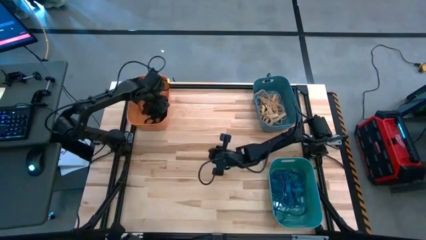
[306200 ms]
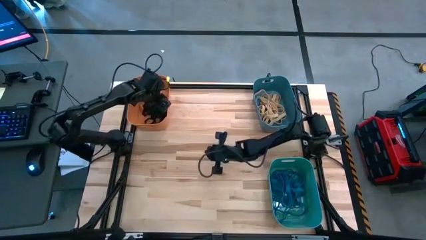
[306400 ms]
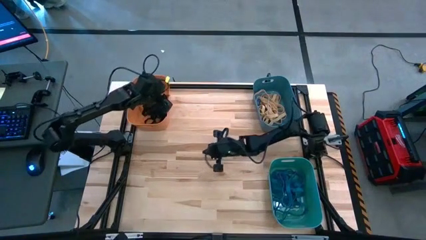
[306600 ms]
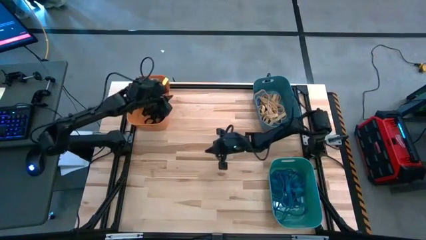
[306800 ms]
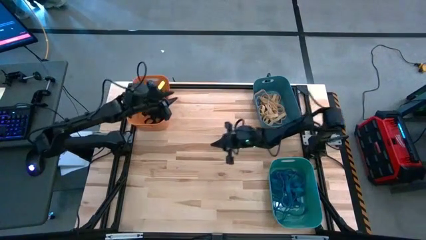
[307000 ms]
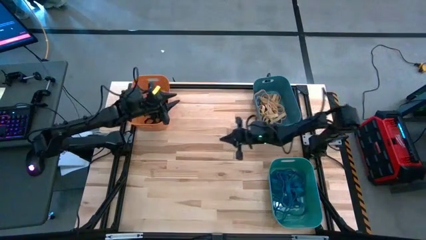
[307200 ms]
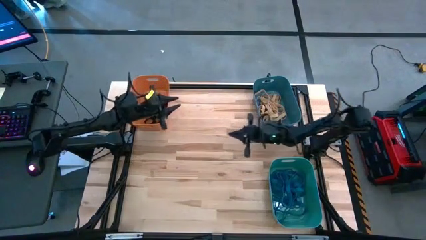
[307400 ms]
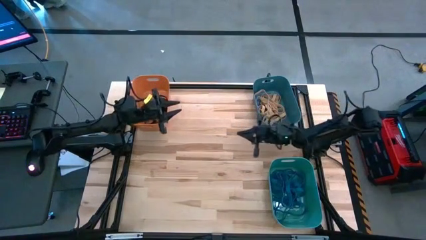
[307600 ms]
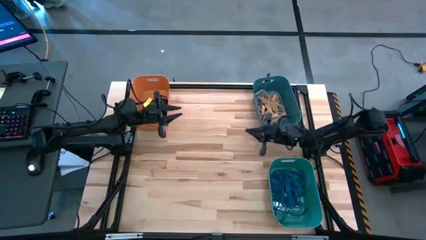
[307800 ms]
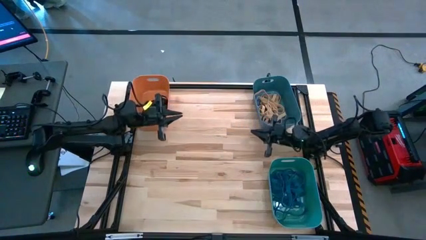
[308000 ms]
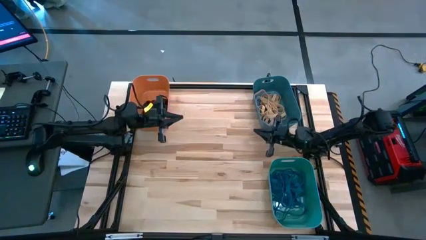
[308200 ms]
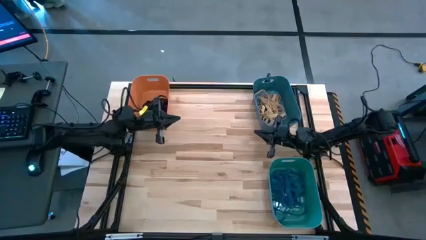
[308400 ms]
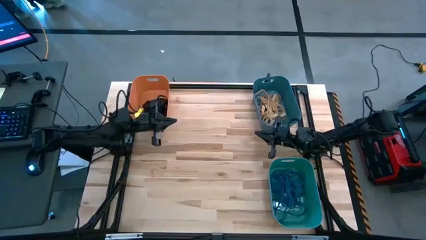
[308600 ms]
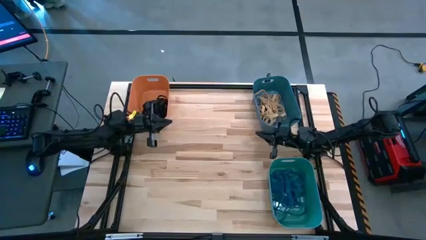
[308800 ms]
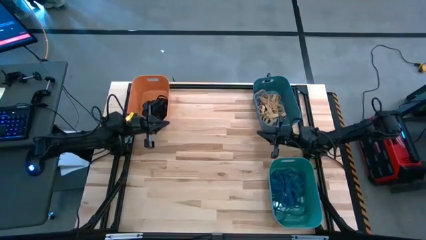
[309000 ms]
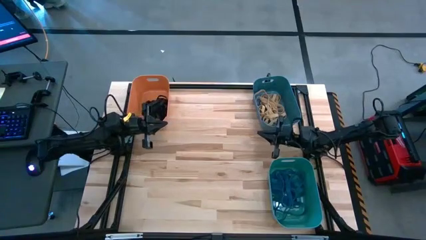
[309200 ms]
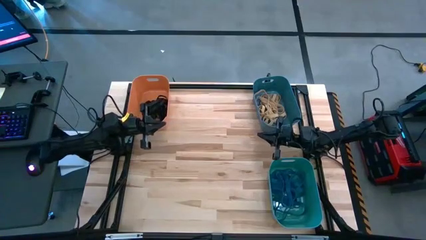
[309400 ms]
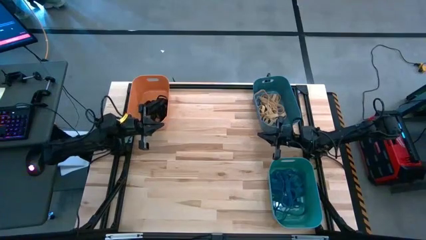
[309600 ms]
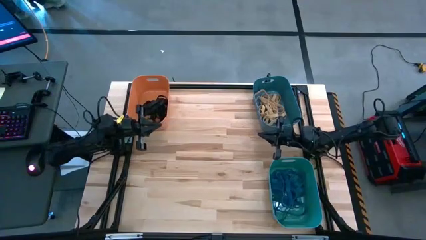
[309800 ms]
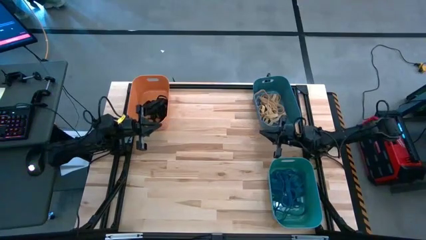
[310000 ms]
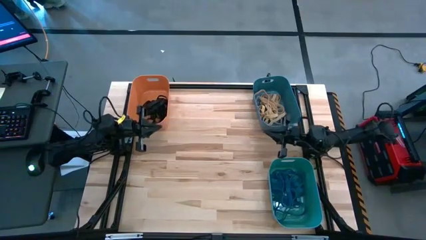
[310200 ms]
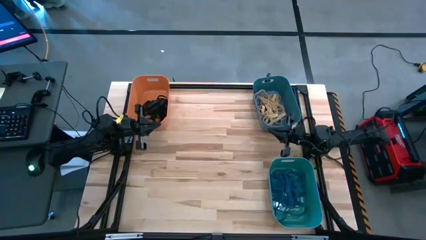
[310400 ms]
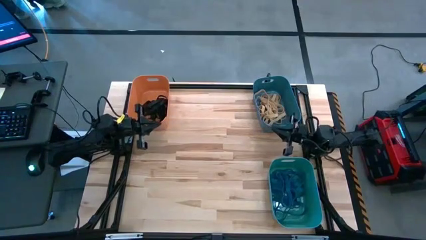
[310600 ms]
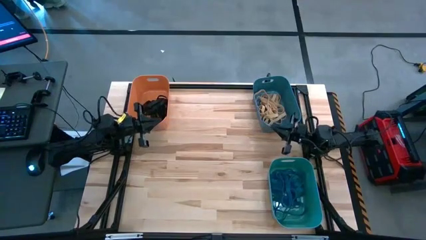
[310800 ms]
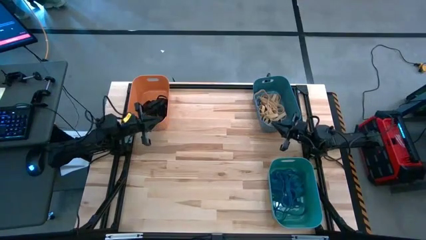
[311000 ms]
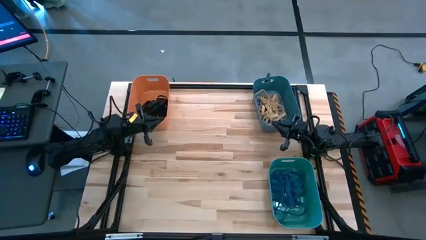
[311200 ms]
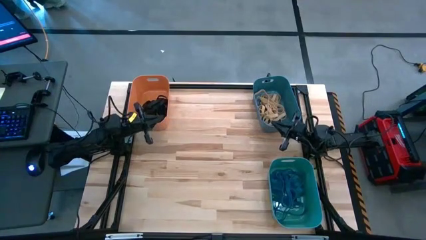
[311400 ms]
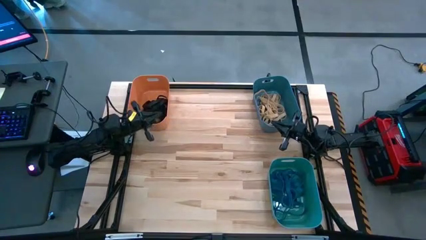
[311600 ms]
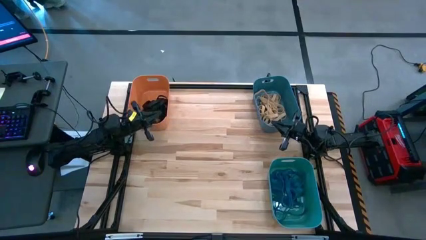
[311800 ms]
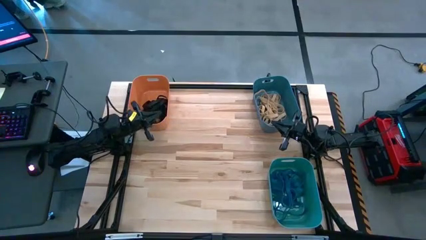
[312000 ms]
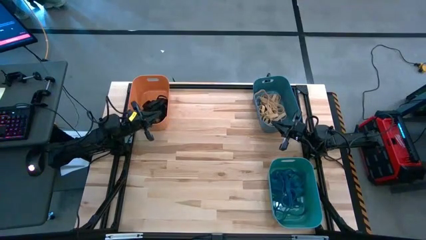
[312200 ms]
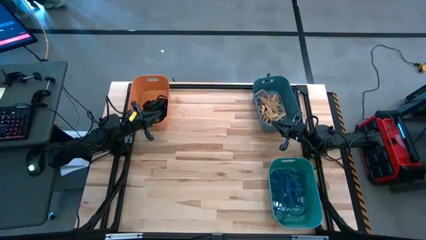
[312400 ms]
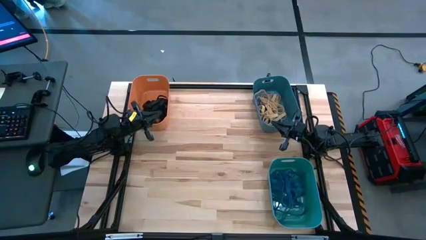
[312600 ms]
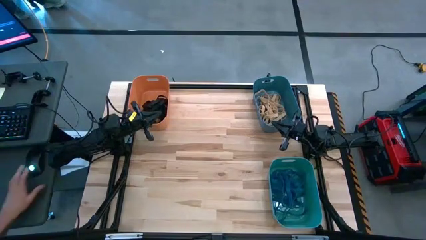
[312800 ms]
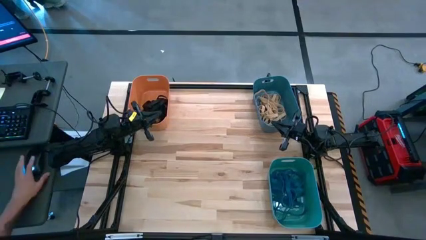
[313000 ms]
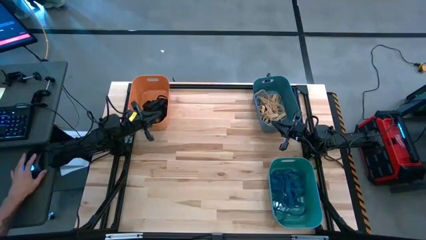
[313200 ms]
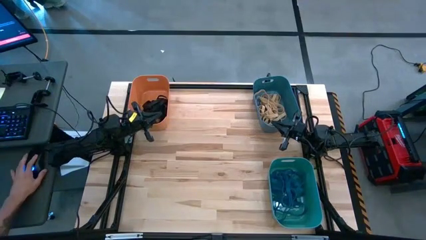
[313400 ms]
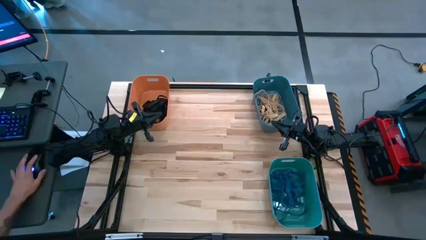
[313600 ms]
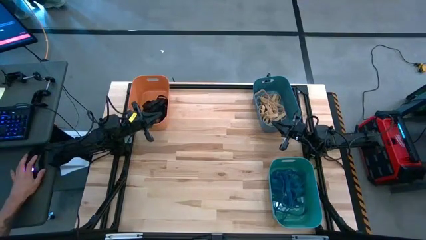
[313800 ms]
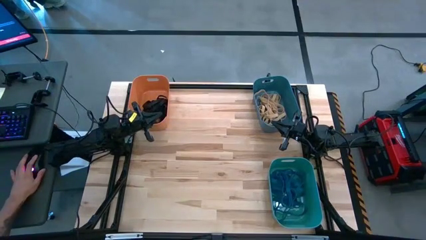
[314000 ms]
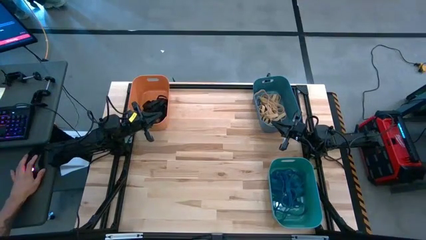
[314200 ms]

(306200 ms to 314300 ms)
Task: Sort rubber bands into baskets
Return to Home Position

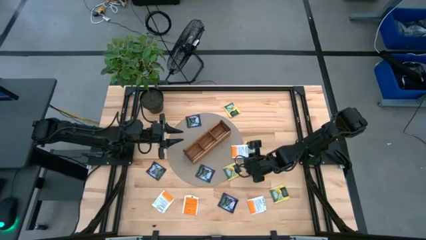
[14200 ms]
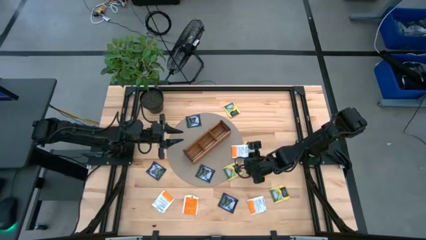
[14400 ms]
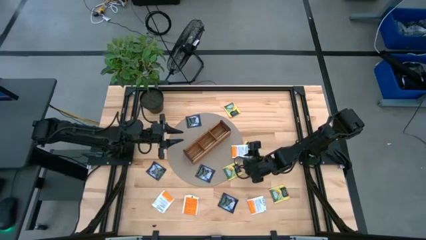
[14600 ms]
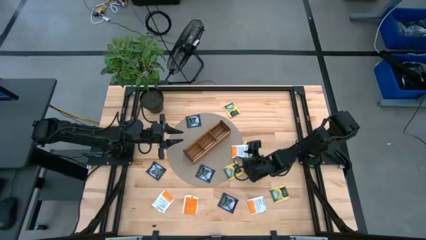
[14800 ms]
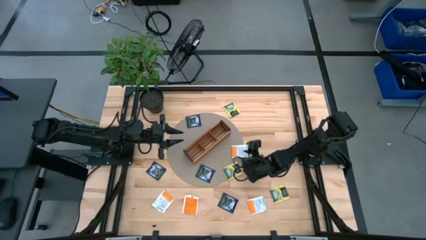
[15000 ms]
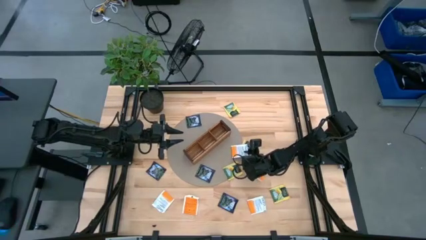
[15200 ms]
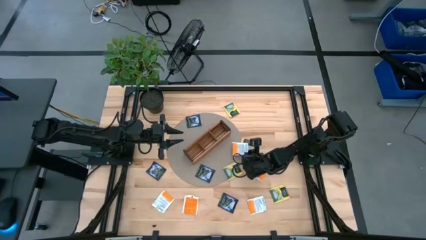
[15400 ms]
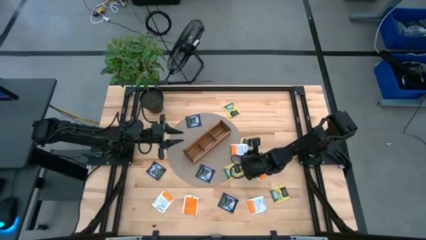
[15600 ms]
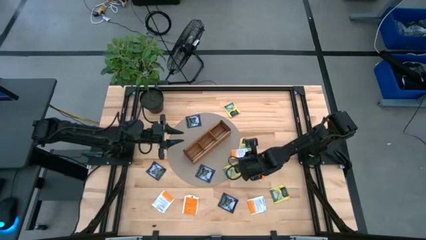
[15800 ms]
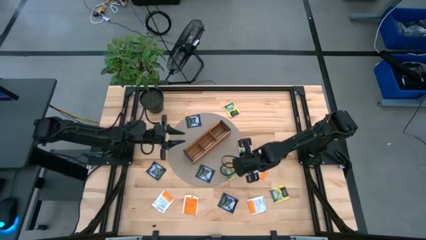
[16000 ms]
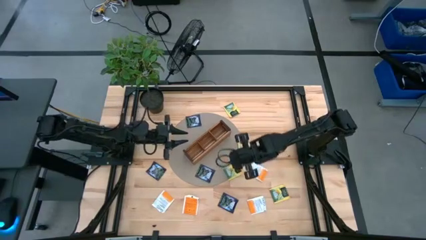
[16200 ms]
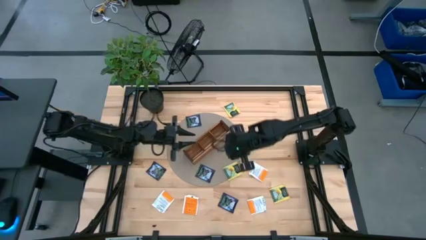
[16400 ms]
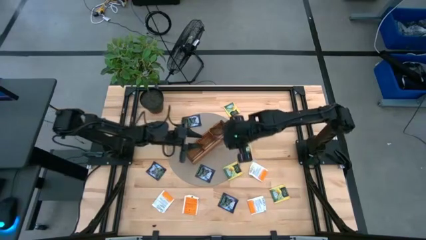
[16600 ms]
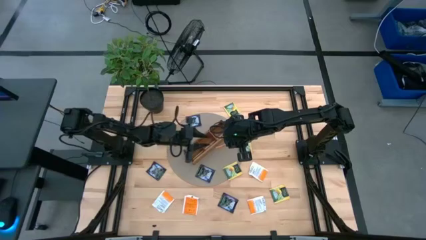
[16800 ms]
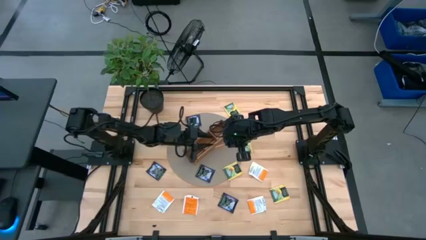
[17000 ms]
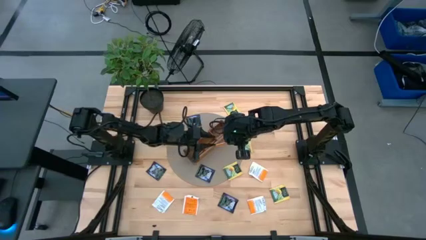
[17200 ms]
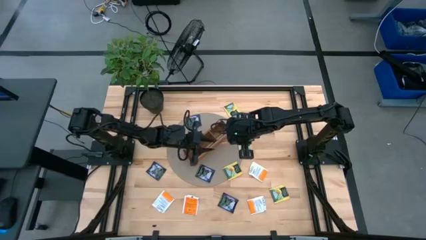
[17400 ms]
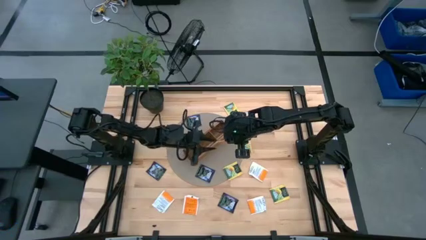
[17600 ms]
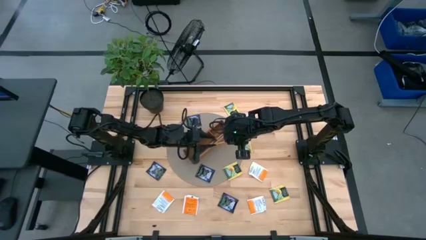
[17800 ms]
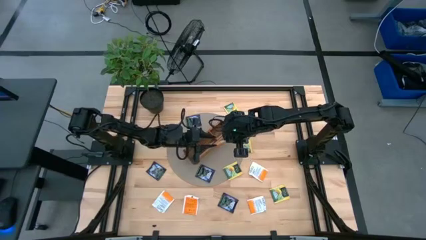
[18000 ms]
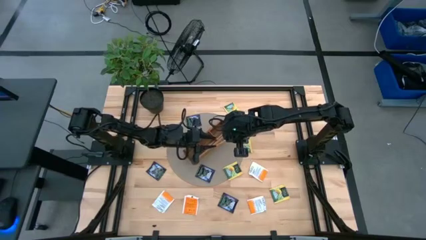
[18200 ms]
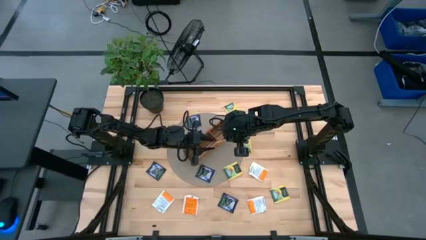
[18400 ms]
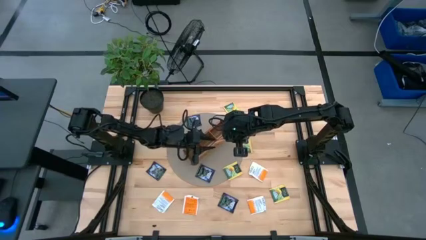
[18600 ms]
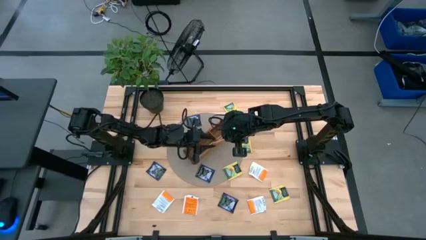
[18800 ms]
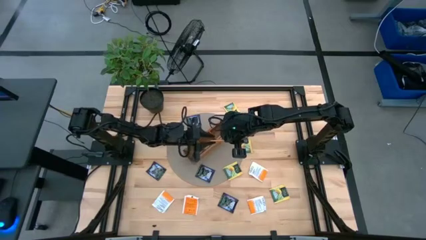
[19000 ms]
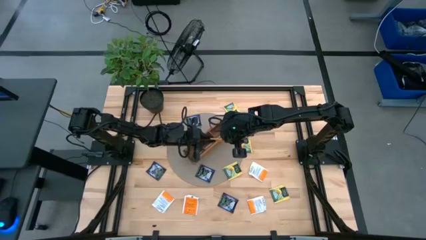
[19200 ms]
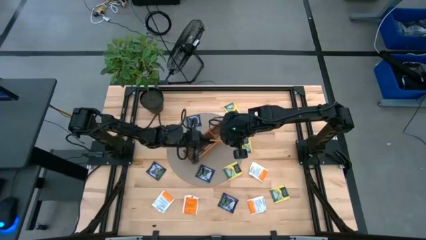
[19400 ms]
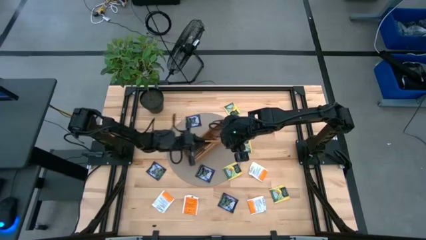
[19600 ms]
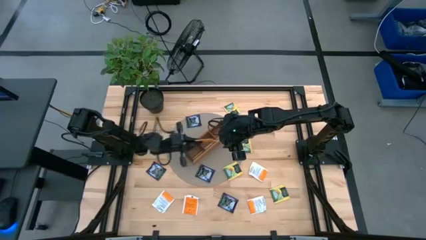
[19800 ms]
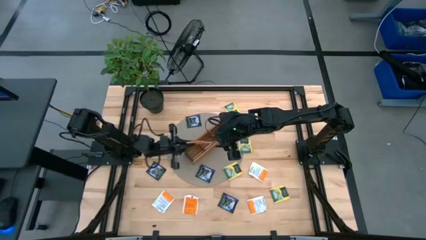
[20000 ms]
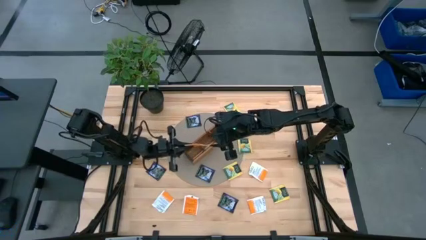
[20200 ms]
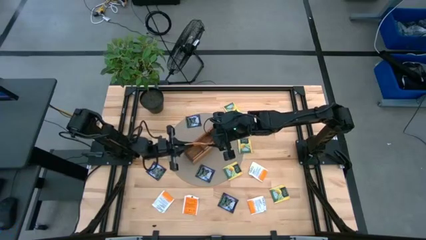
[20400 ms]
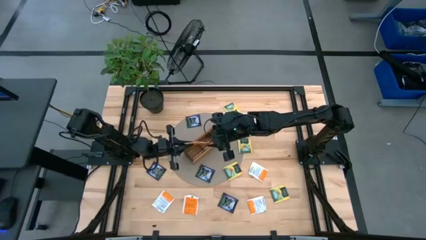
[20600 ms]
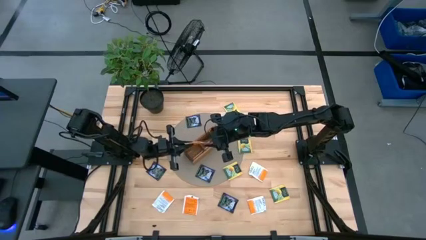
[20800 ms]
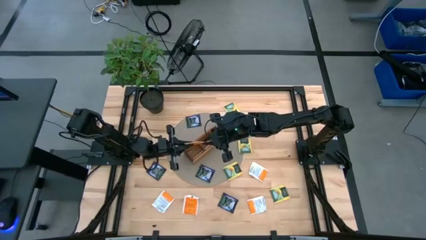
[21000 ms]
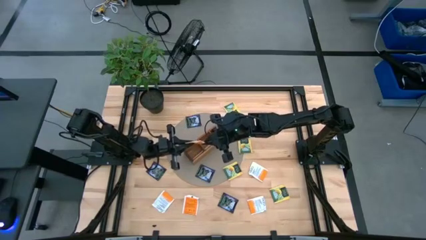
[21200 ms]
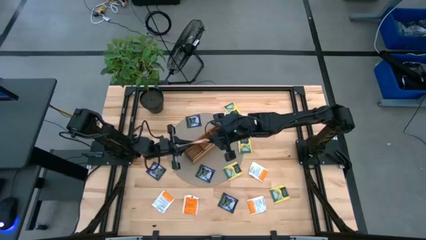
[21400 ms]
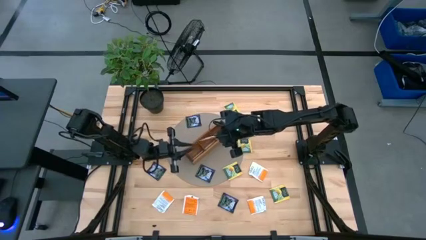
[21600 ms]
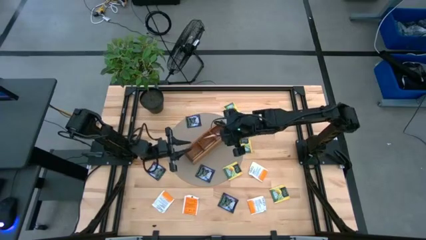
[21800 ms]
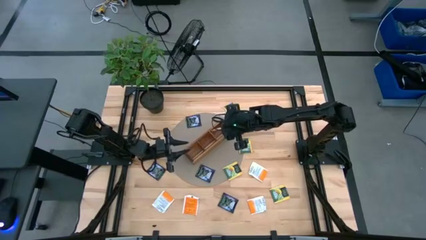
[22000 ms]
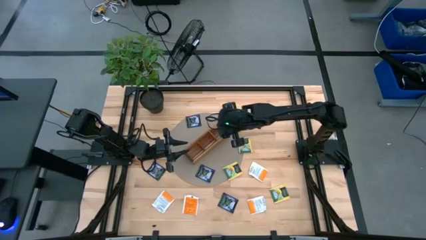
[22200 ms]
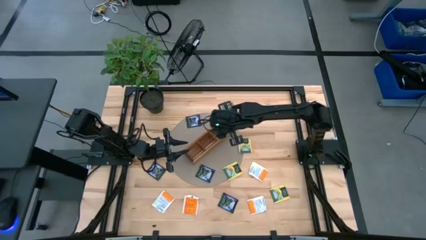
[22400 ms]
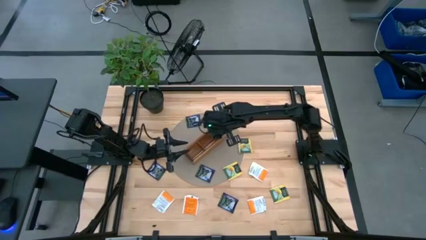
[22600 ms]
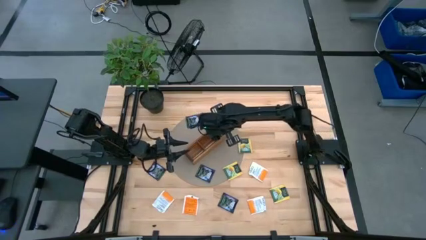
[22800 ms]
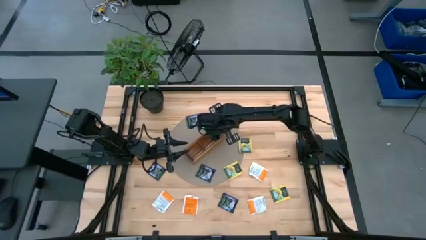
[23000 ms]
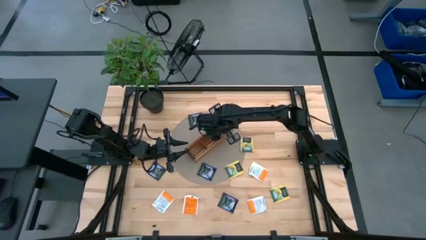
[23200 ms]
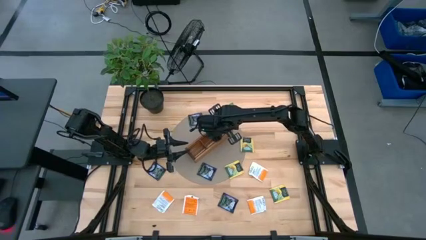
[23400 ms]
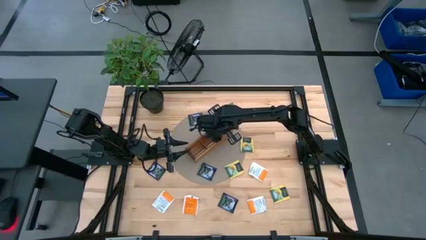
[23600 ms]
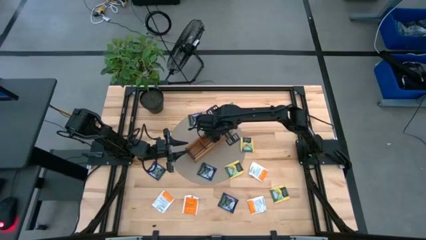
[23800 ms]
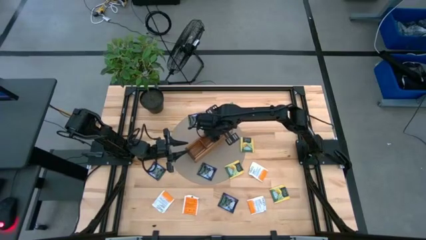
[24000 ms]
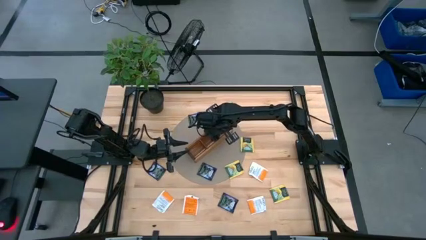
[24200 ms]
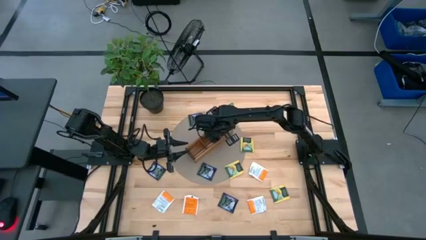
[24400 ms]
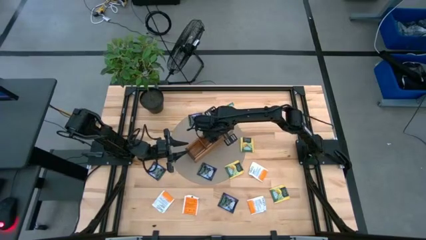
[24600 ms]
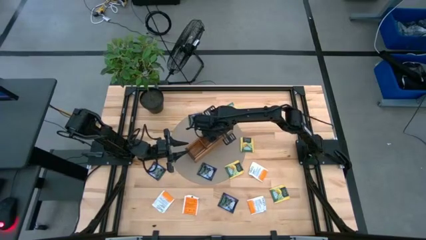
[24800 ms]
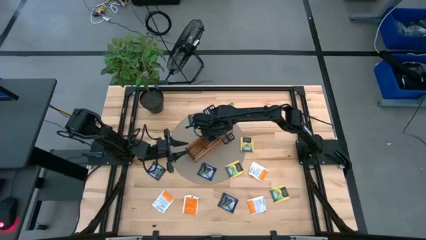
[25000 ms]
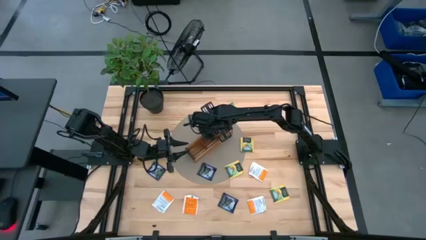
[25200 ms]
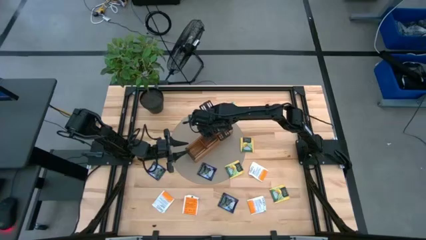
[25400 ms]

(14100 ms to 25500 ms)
Task: Pick & Place Tea
Put the orange tea bag into the right section of the wooden organizer
